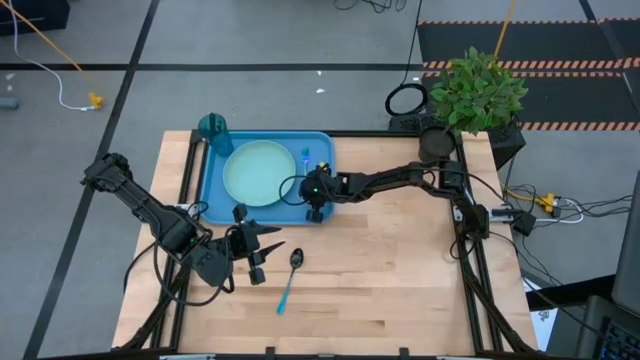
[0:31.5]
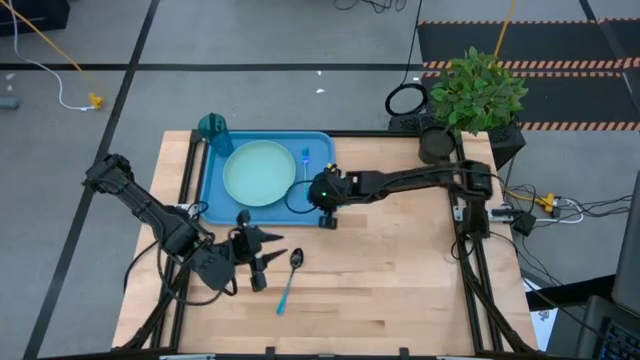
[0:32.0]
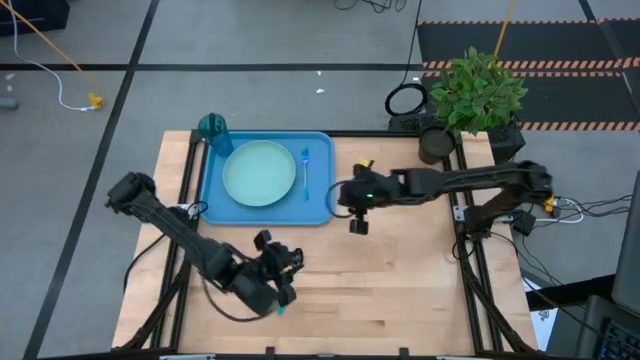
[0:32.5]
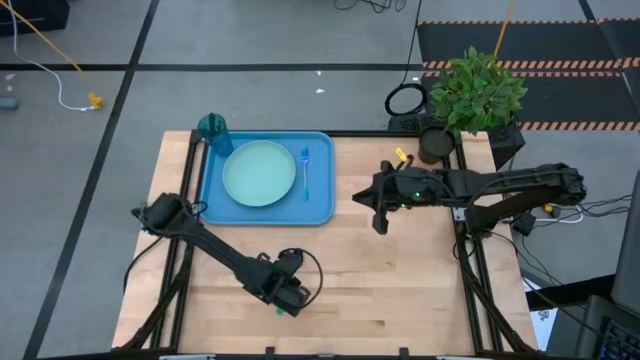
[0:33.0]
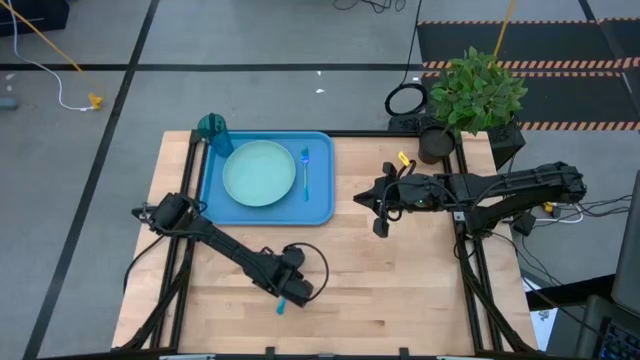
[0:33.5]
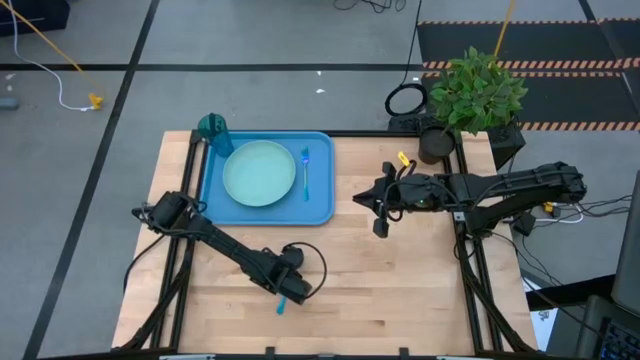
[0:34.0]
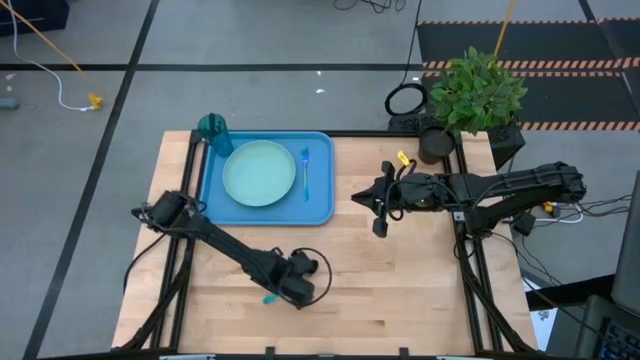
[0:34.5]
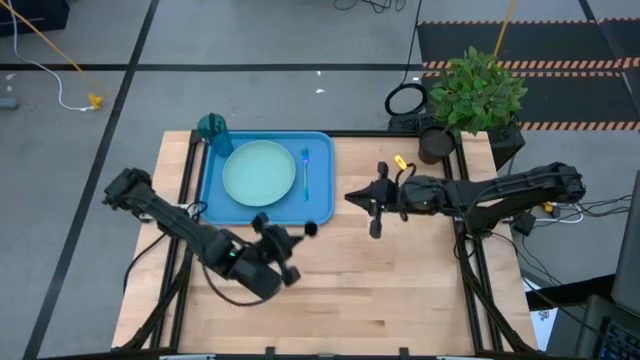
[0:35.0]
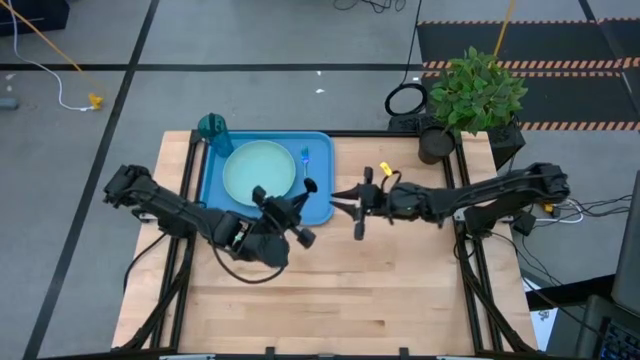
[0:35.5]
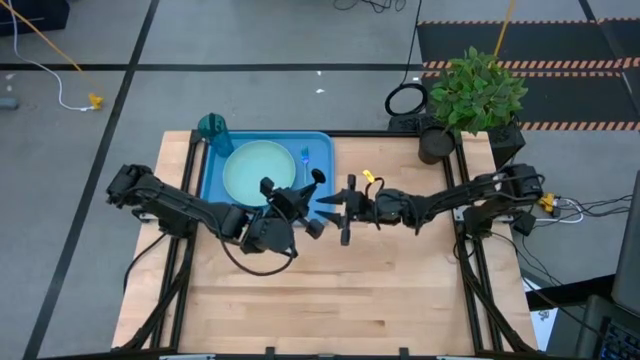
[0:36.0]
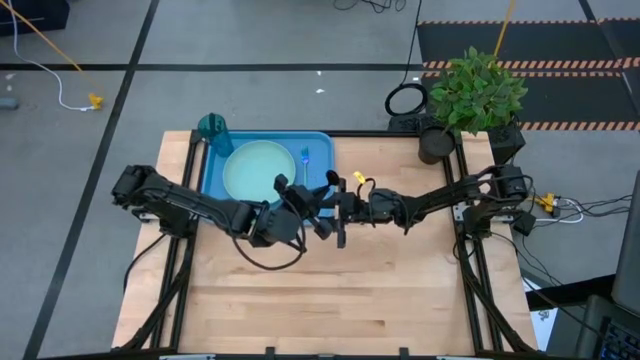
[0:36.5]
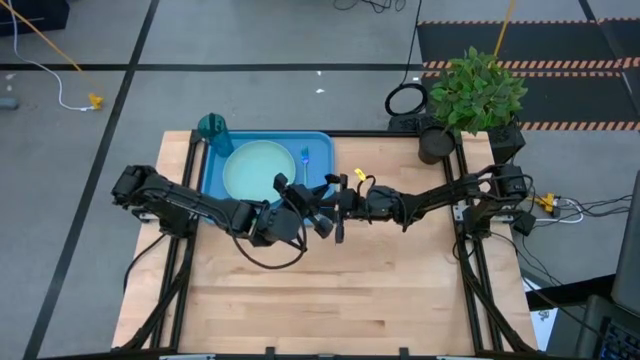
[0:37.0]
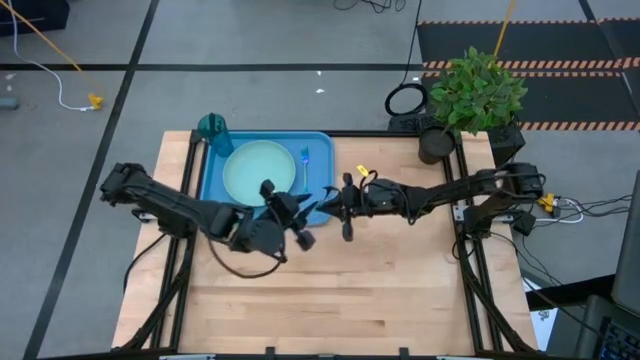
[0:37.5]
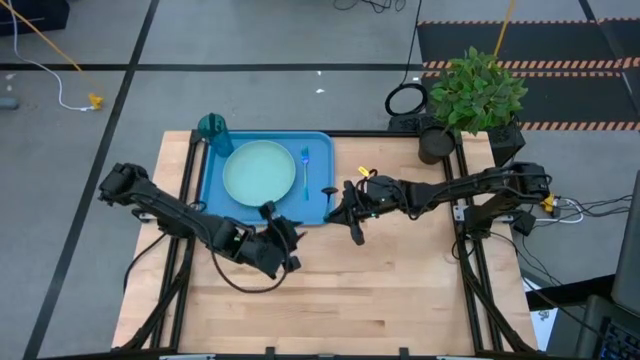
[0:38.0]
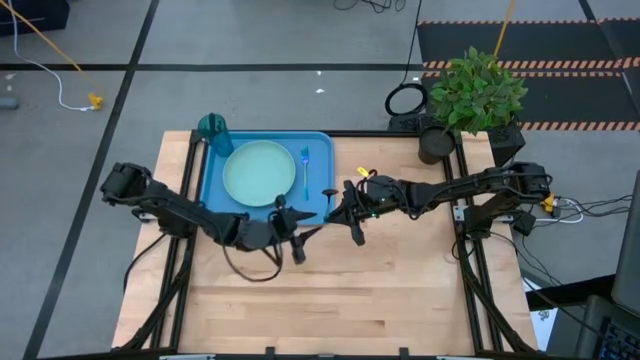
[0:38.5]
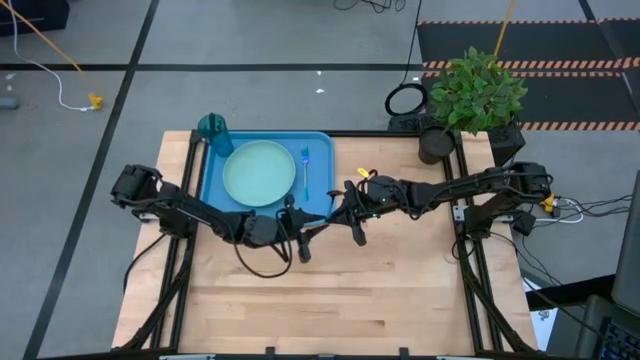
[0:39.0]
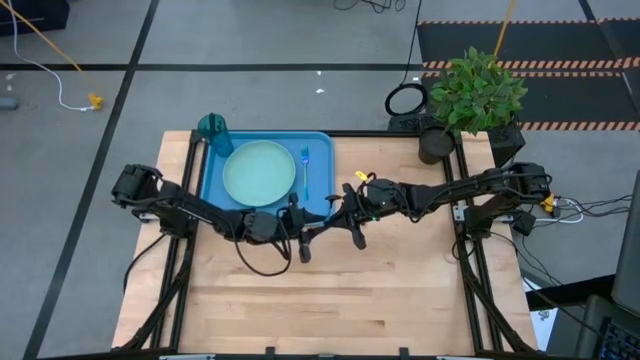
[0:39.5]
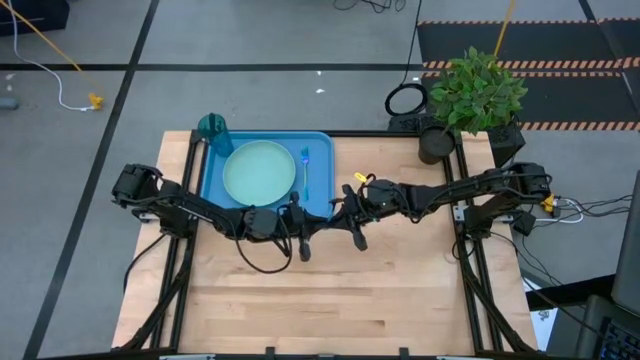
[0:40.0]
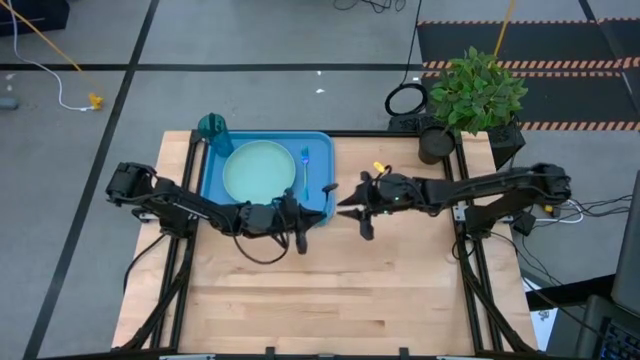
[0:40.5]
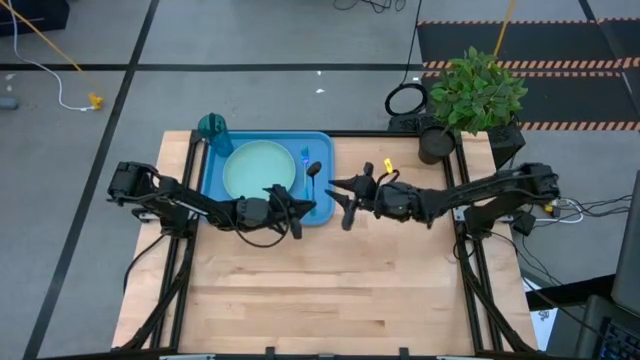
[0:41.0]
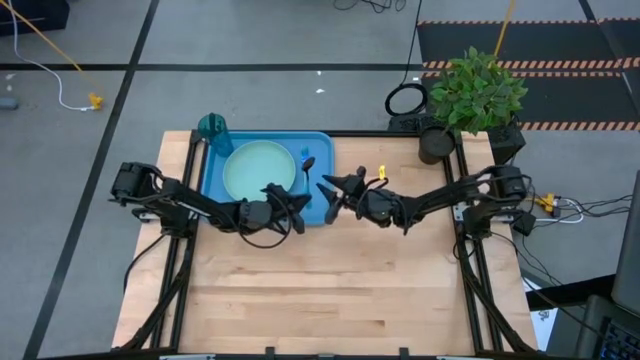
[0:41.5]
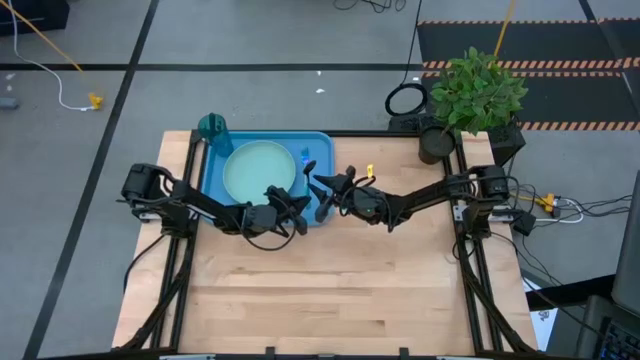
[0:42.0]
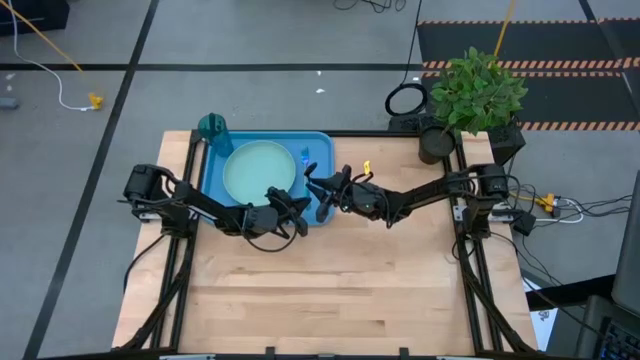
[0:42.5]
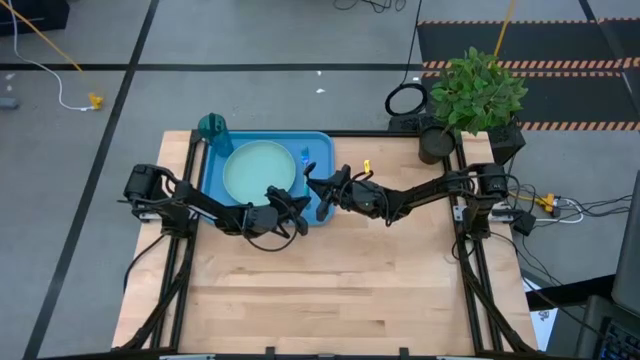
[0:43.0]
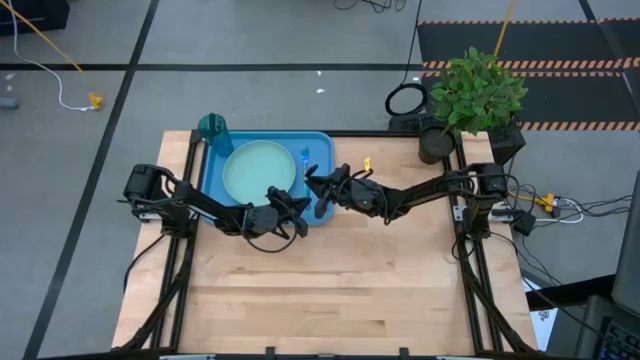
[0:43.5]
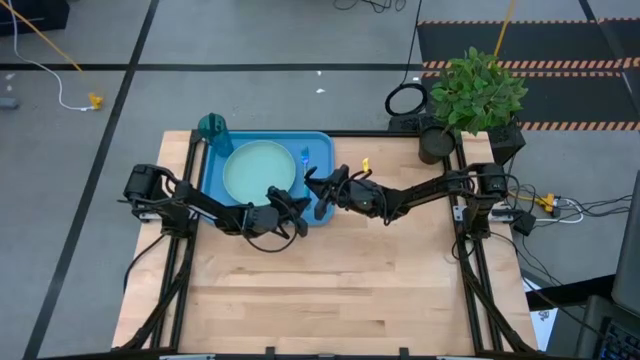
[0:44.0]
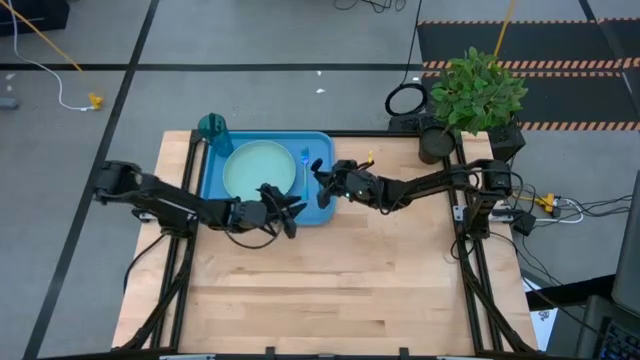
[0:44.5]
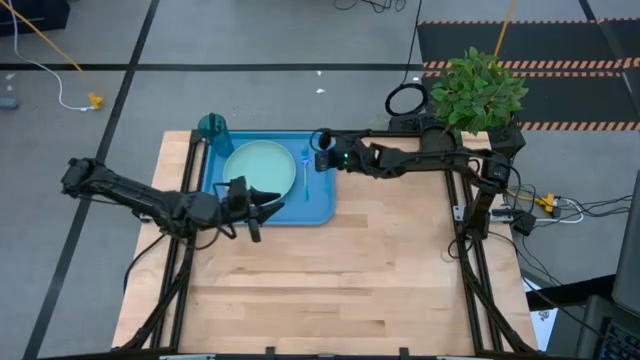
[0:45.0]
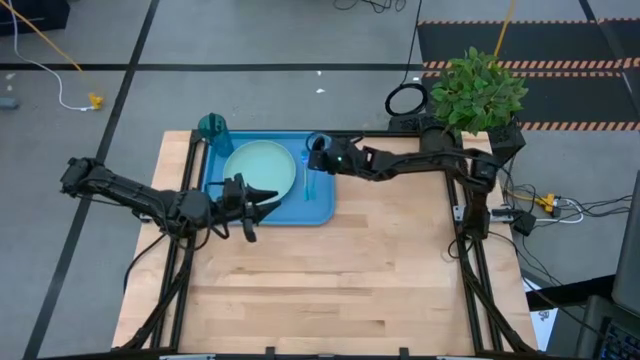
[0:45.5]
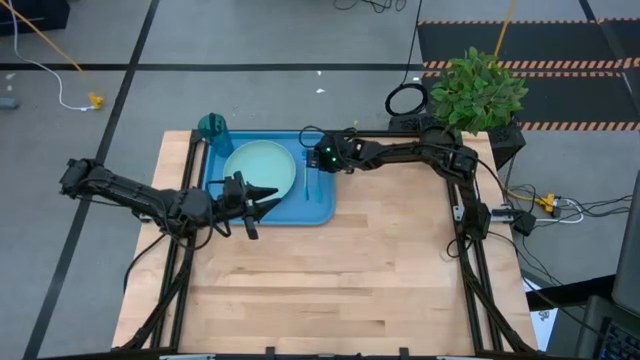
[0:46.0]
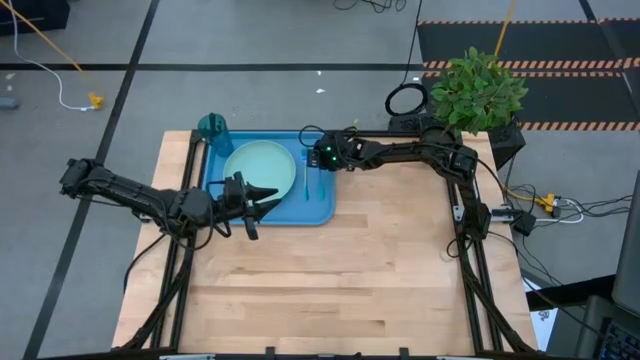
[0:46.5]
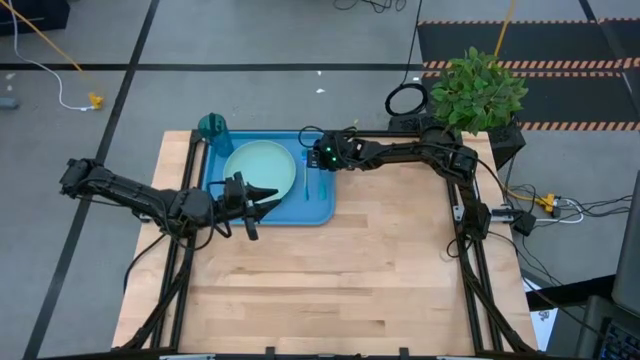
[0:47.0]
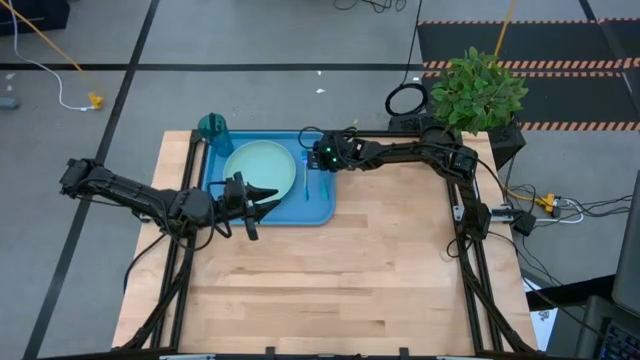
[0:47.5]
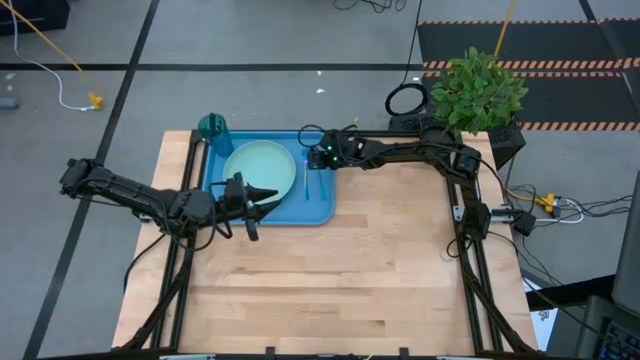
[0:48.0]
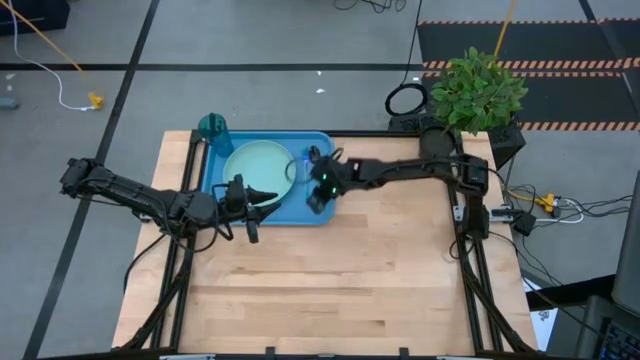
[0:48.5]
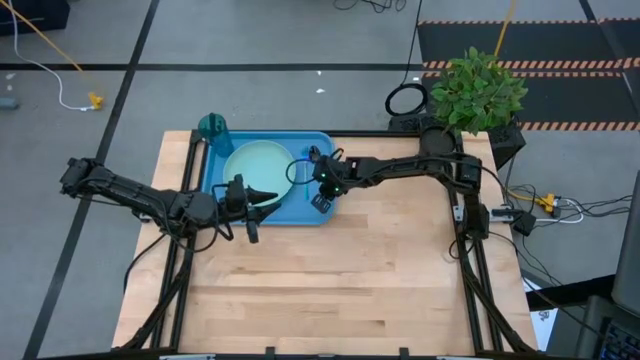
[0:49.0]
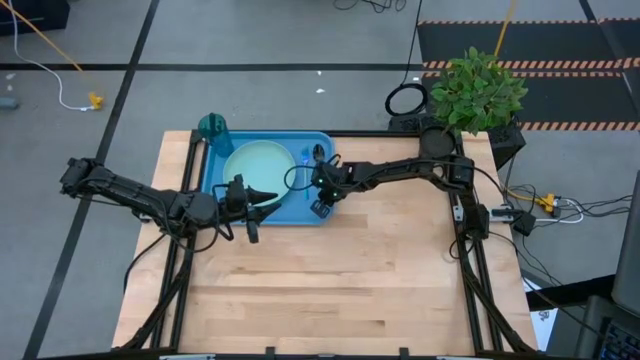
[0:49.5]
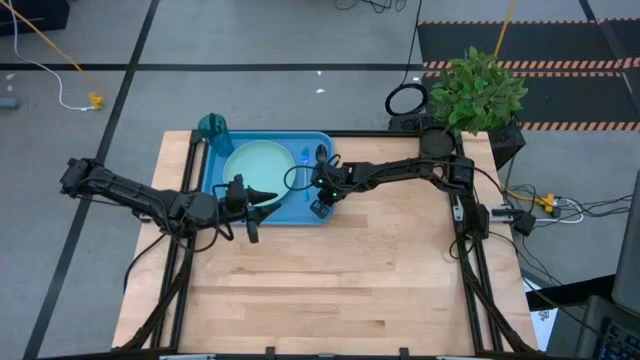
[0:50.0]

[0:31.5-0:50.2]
Task: Pick and place plate/cup/fork/spoon on tray
Put the spoon on the blue tray
